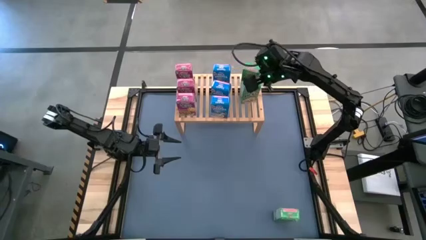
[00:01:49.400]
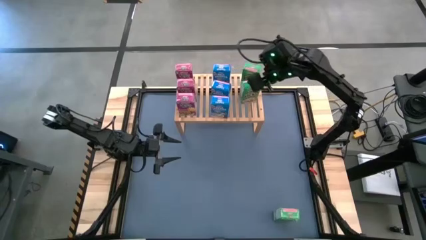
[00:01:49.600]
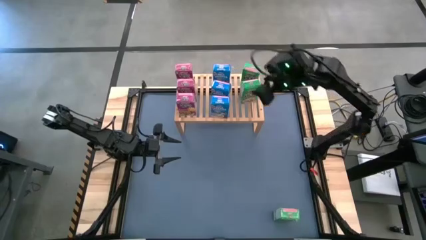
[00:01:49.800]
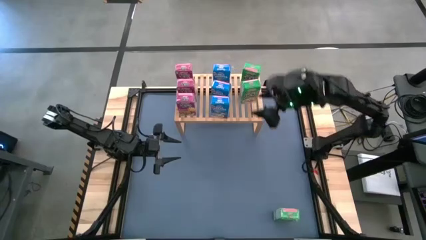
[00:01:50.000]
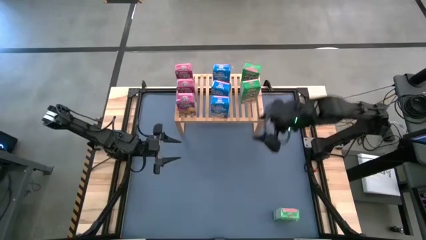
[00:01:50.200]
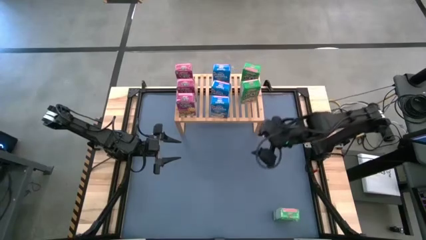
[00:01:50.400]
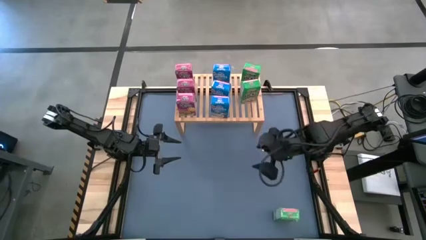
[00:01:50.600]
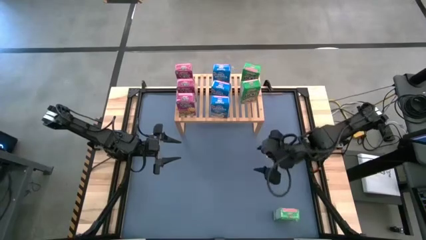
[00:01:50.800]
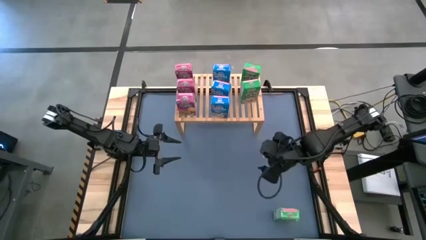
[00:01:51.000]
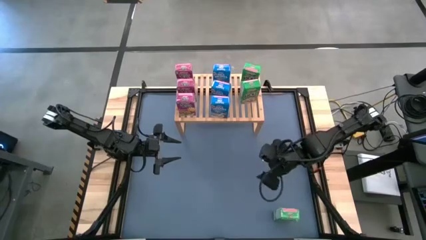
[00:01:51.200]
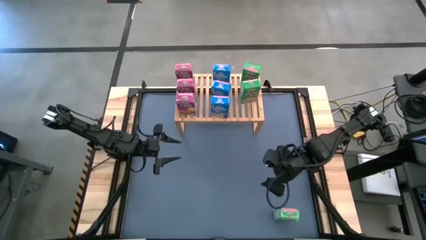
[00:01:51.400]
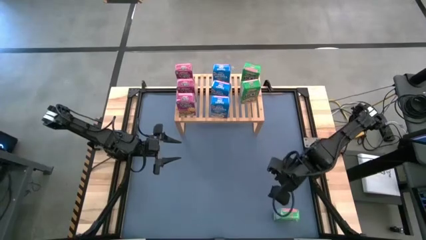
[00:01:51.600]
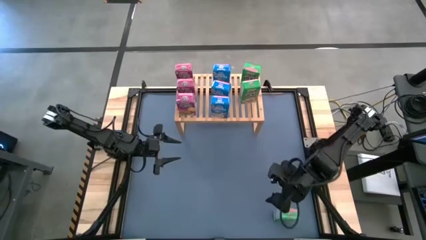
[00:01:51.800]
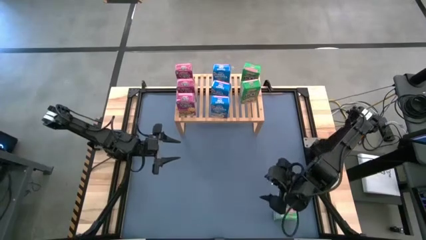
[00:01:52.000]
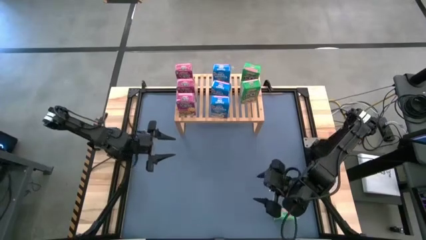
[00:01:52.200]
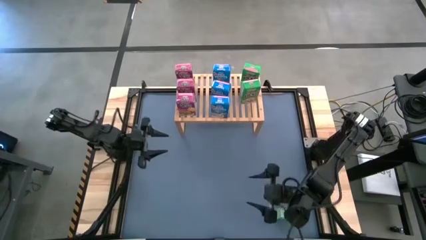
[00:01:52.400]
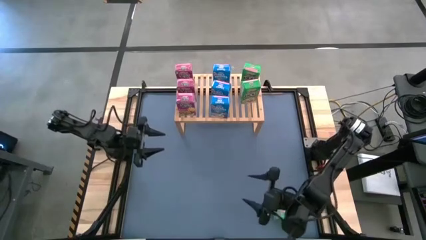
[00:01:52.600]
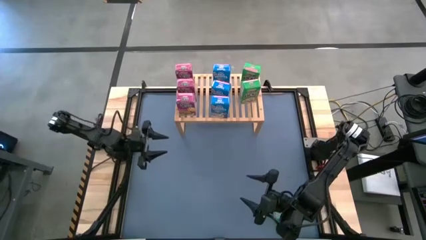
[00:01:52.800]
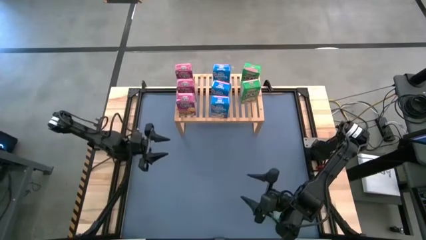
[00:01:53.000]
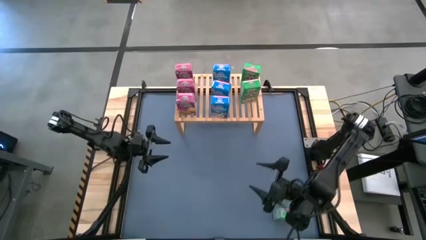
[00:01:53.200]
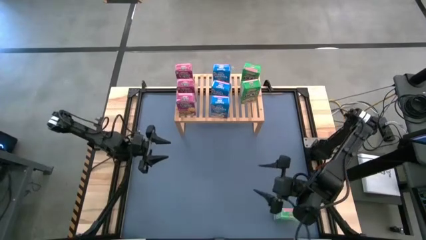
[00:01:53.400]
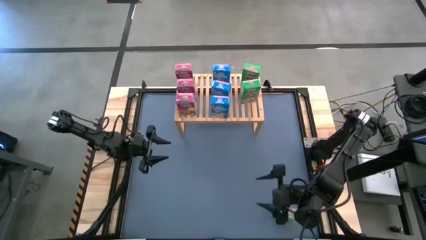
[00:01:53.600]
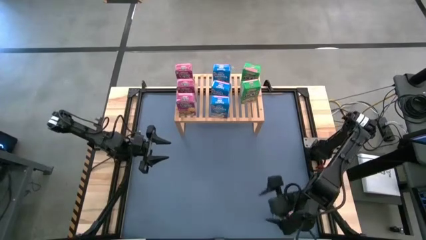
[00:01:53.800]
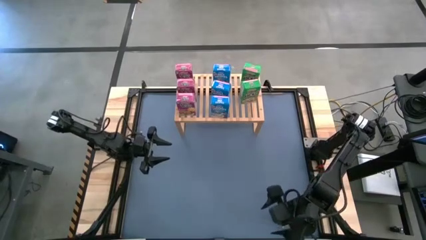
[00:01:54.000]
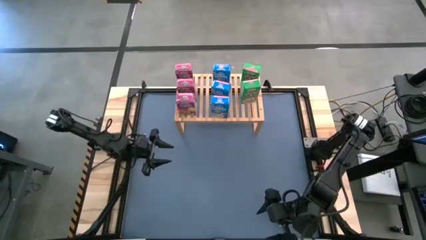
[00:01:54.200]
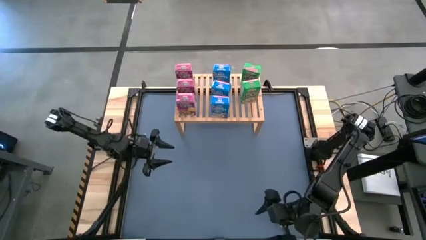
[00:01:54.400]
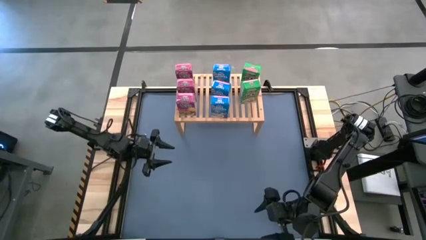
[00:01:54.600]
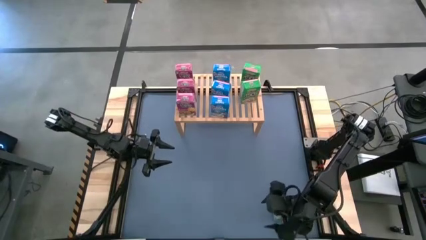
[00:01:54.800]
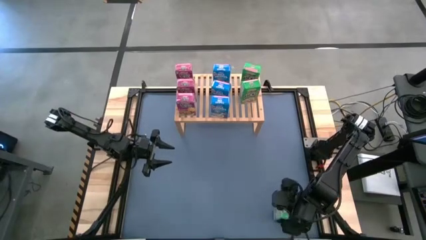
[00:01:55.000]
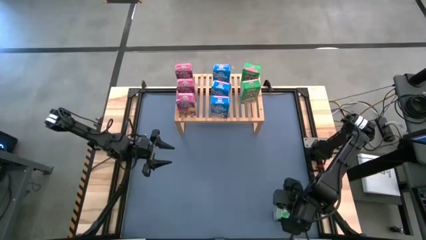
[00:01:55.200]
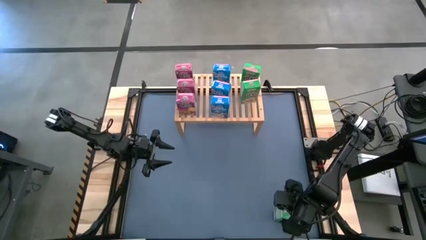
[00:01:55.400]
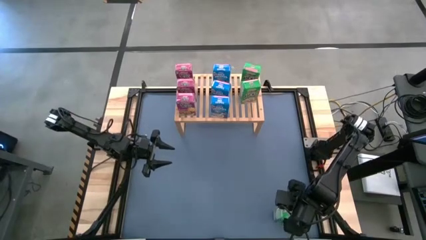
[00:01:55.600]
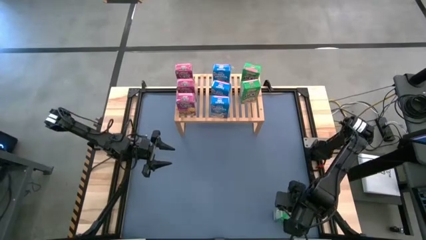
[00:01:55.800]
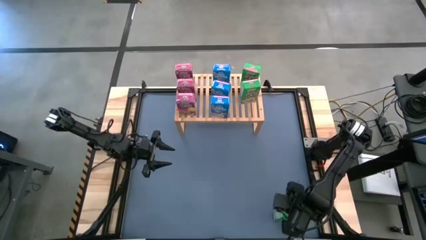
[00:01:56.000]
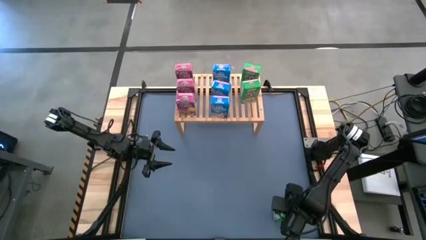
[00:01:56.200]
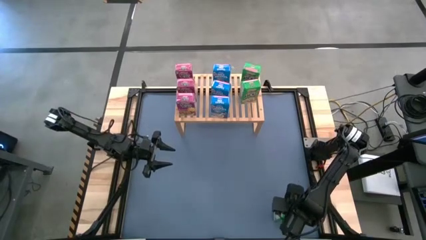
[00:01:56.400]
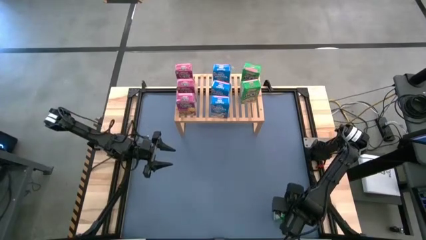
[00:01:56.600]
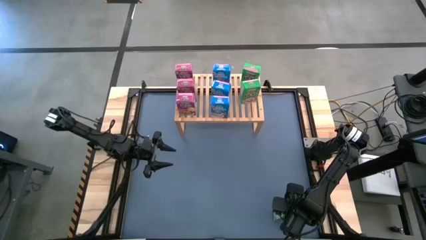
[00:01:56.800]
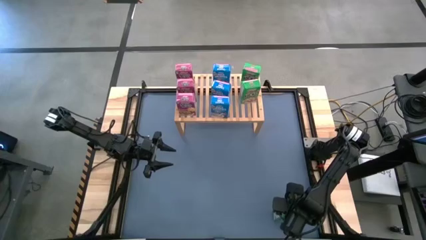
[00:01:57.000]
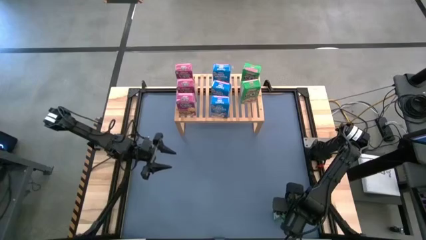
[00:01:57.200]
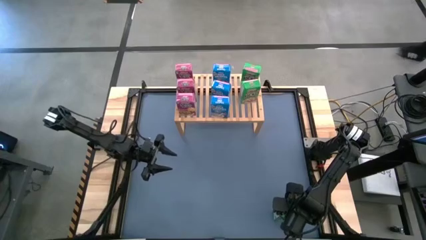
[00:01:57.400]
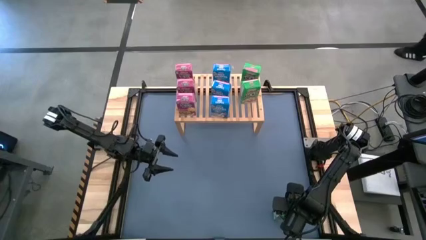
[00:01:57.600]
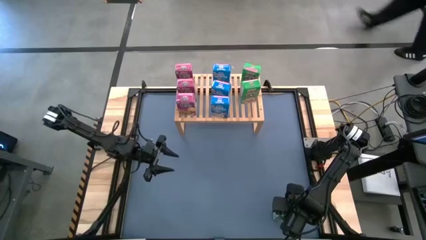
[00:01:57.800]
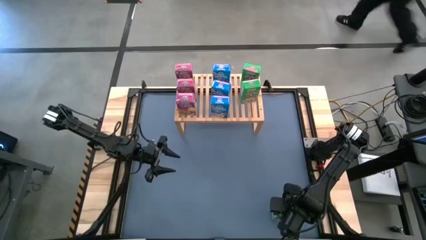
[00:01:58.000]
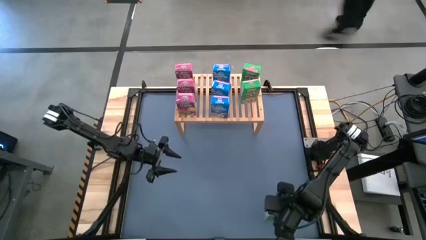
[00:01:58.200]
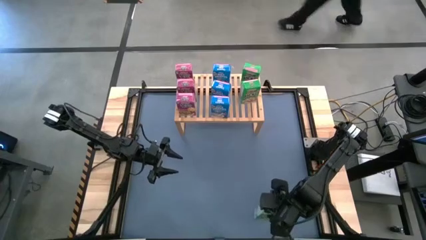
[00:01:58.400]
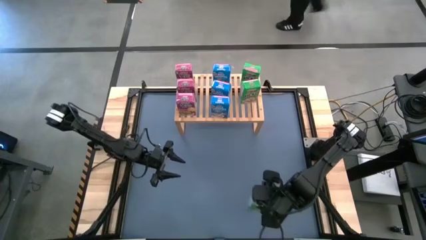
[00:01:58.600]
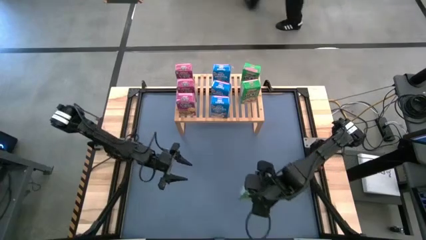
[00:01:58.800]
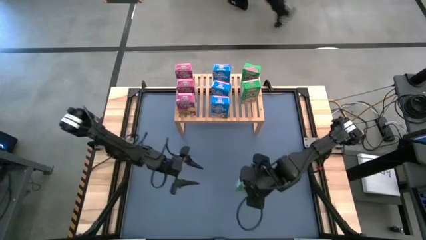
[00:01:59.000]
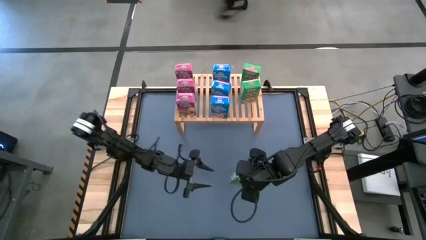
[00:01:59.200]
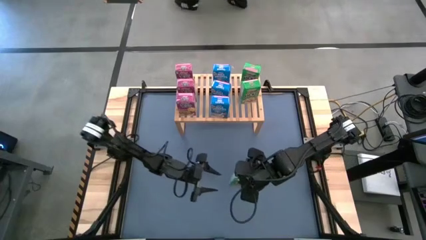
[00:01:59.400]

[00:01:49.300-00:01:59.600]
Task: Stack cereal on shelf
Put the green cereal box on the shelf aligned with the other green cereal boxes

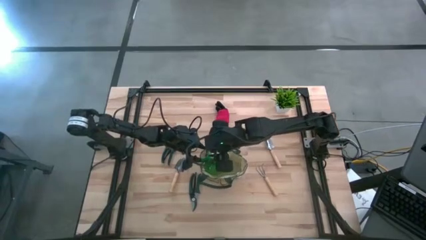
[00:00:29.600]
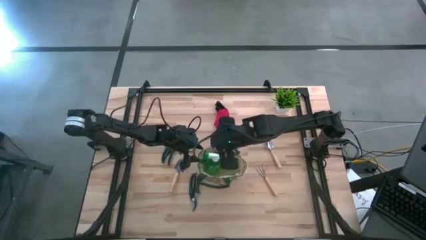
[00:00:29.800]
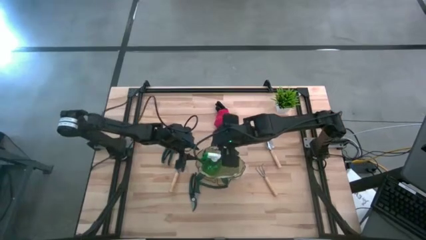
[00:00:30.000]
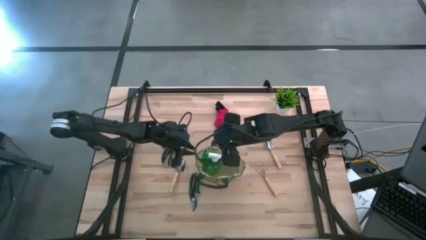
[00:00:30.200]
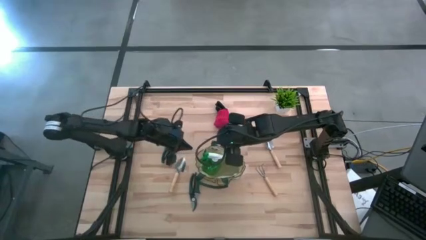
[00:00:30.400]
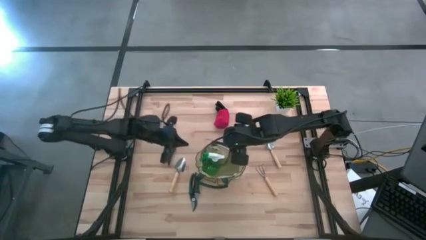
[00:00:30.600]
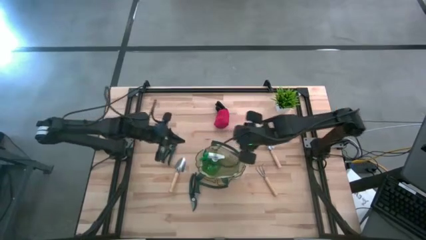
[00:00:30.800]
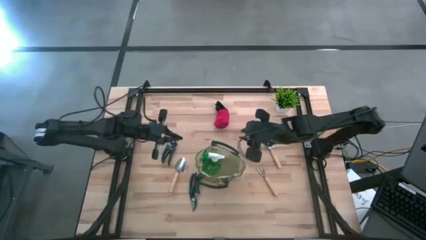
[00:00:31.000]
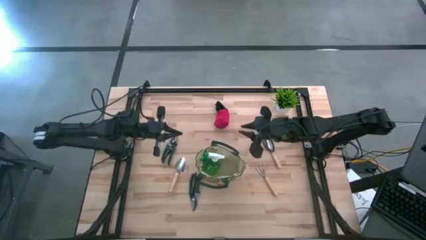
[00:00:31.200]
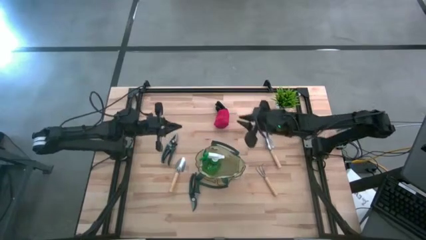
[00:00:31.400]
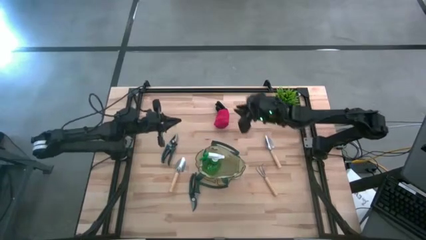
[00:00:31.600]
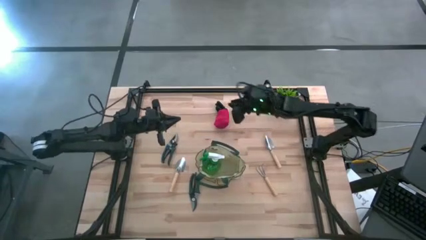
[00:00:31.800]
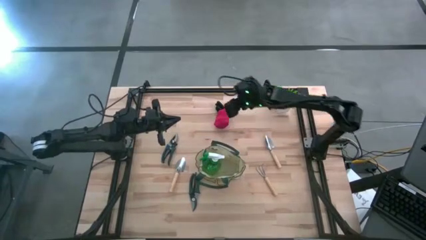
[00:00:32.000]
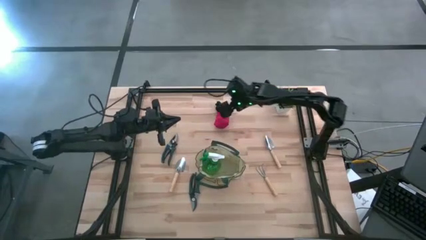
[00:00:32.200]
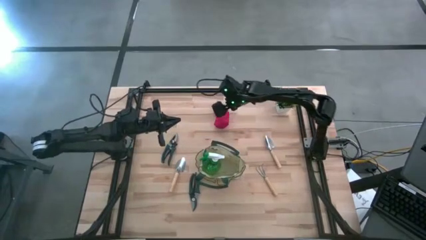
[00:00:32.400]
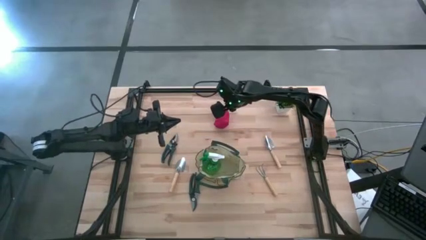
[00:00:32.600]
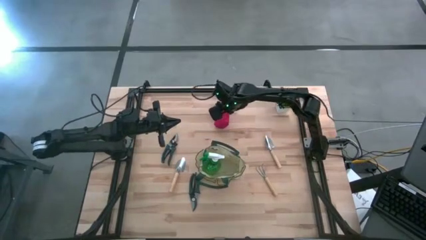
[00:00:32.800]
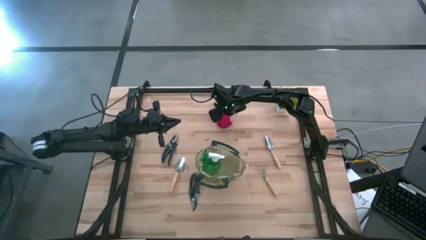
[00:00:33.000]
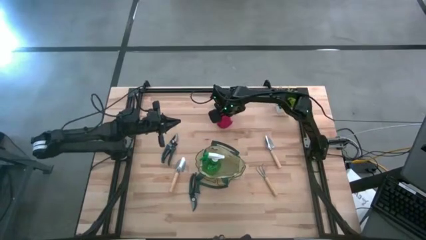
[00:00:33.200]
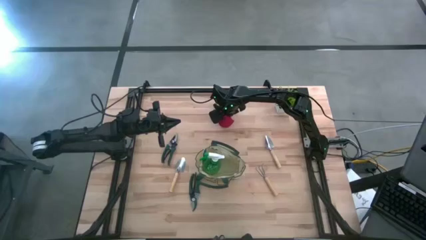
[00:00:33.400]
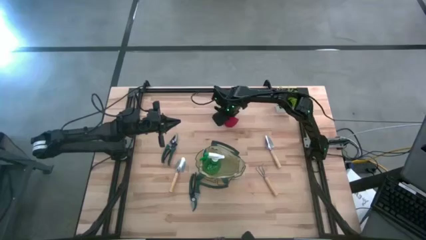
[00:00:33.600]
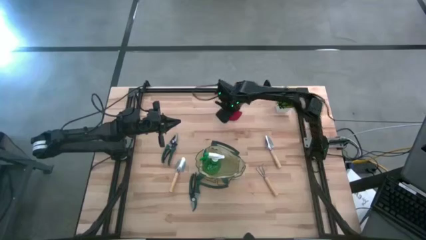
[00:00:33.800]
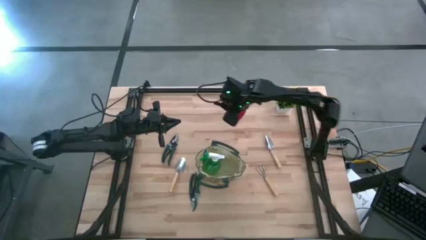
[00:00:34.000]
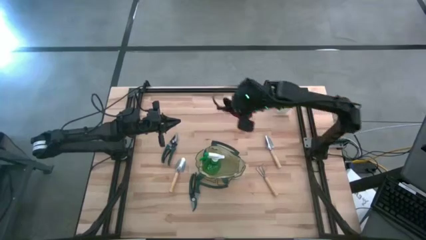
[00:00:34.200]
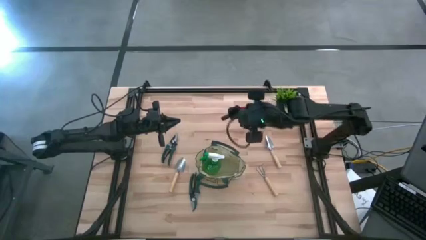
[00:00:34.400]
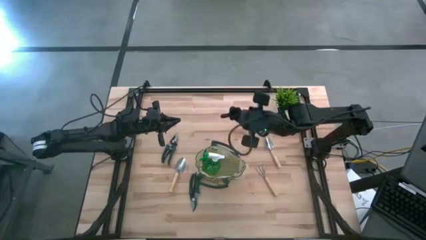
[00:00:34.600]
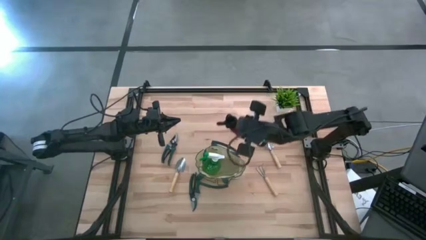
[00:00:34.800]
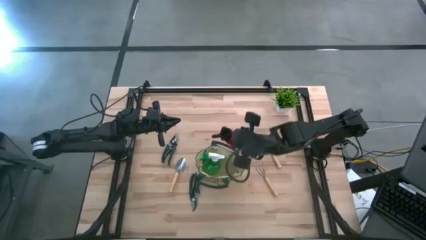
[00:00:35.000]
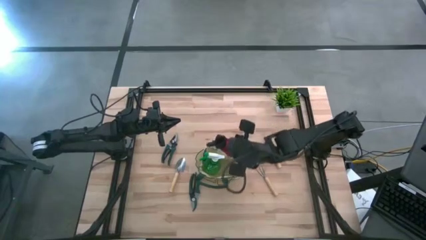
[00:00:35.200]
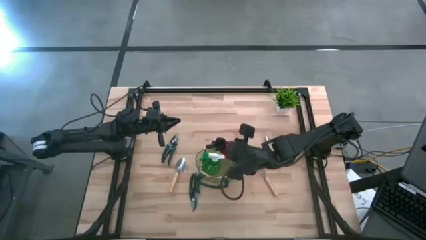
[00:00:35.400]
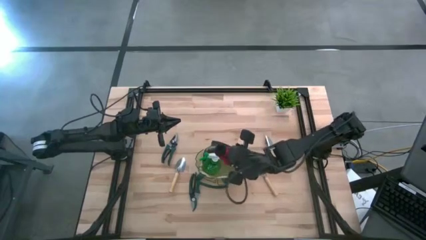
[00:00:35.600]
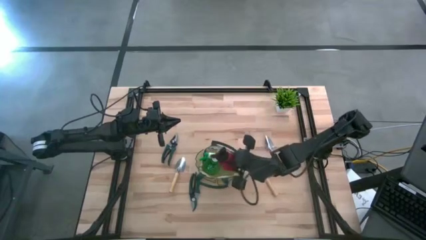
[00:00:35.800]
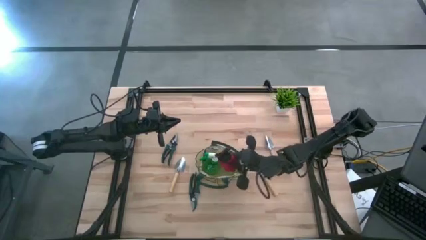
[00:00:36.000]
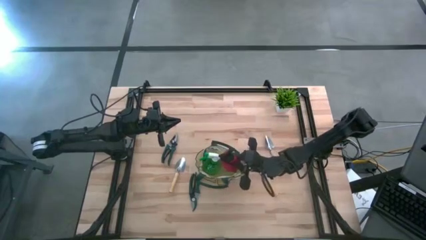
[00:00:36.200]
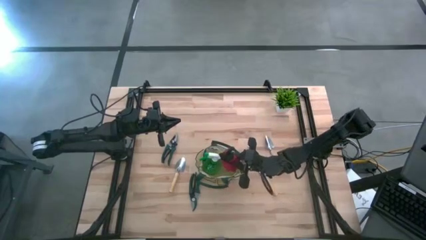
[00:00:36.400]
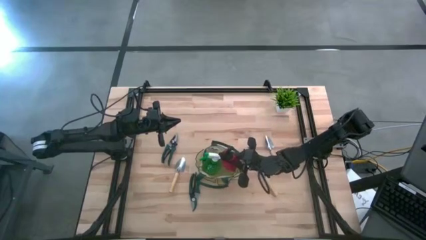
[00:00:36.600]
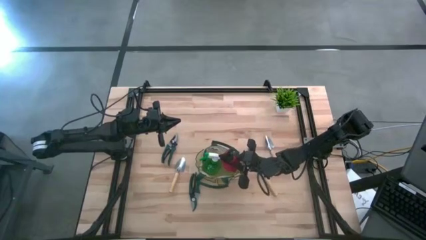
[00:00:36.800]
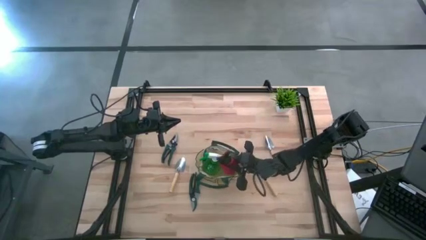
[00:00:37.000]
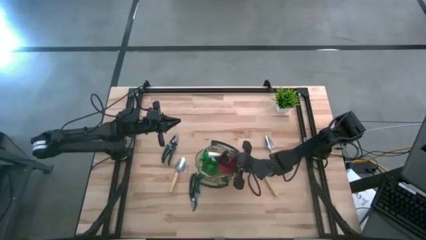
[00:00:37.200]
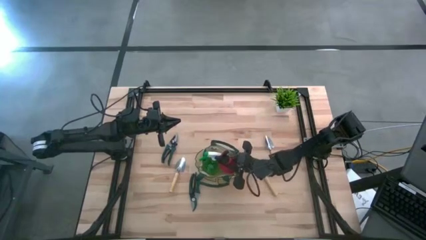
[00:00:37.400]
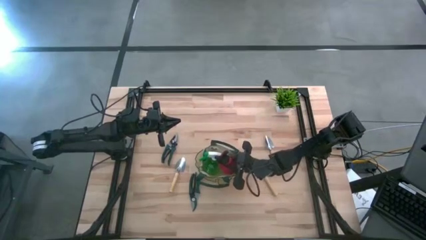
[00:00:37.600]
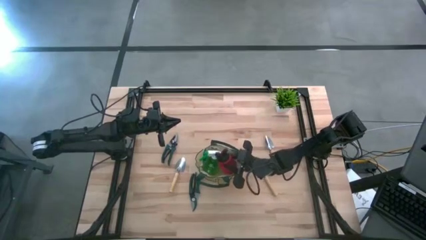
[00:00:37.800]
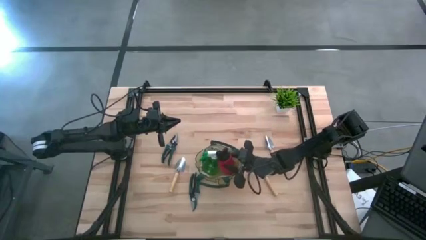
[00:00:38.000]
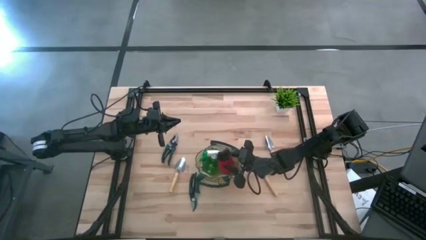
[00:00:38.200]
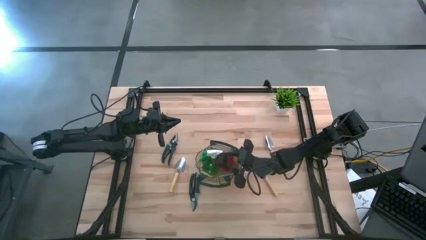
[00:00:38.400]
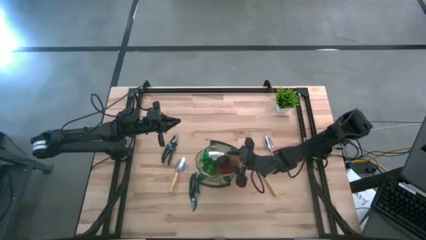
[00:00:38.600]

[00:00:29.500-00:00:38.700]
Task: Pick & Place Garden tools in Gardening bag
Put the red gloves into the white gardening bag
